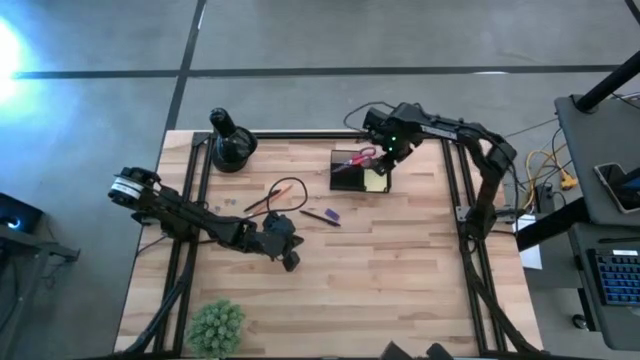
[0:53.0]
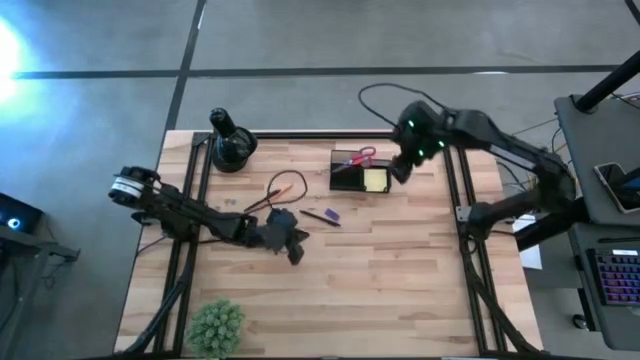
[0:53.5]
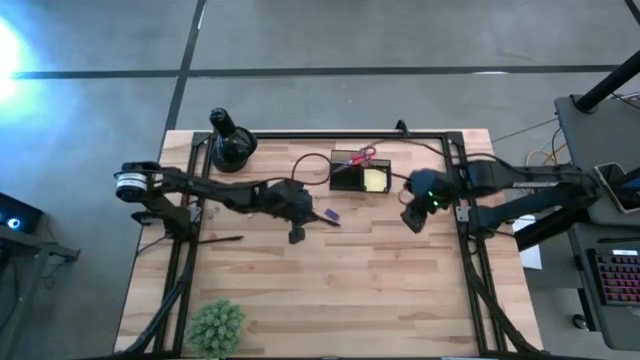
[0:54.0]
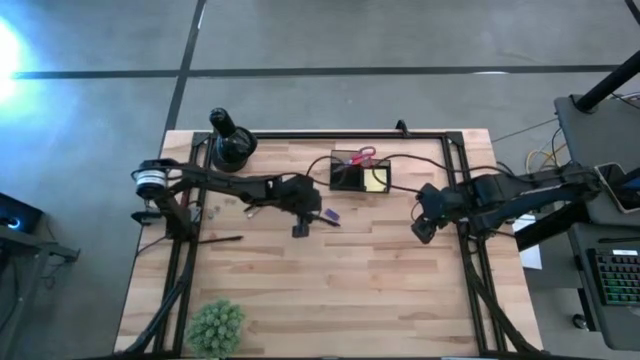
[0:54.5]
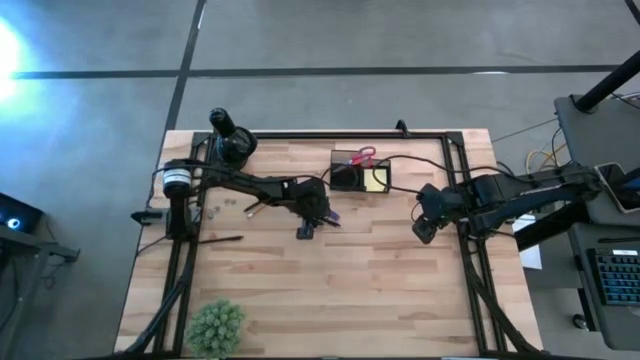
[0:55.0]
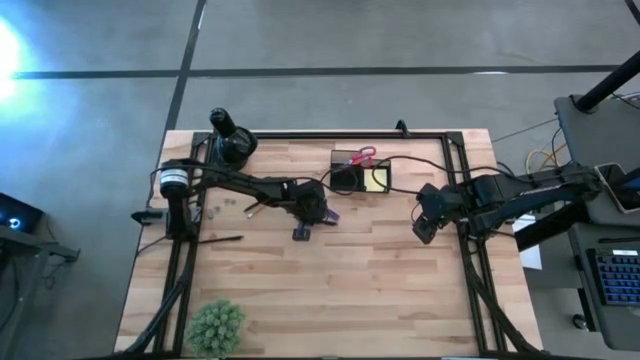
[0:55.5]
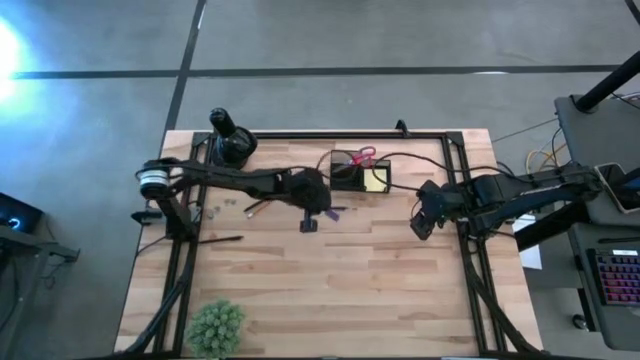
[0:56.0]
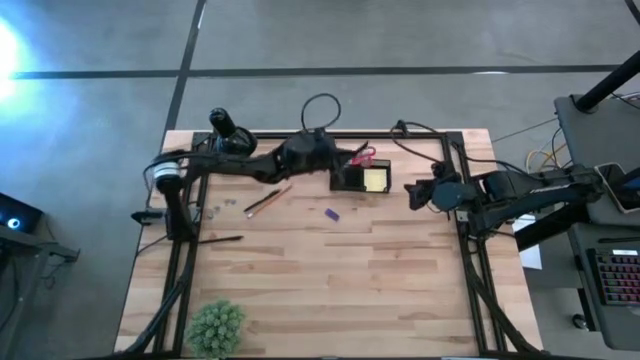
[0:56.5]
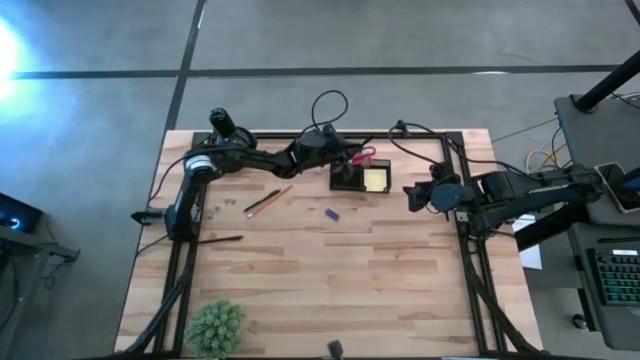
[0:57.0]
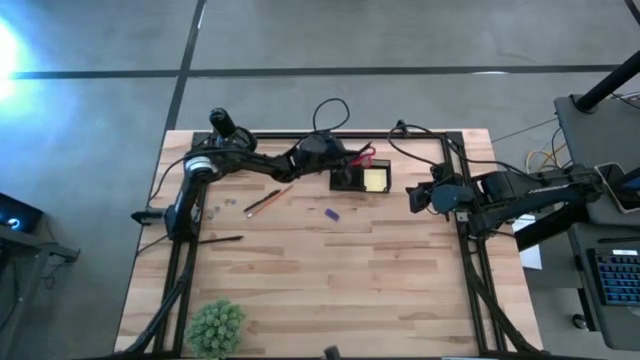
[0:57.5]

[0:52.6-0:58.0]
Task: Pick and place office supplies into organizer
Put the right black pen into the desk organizer

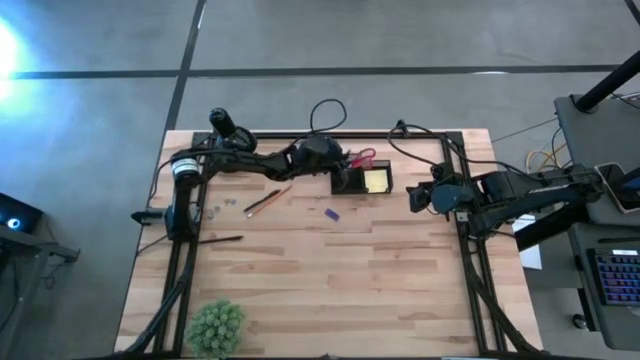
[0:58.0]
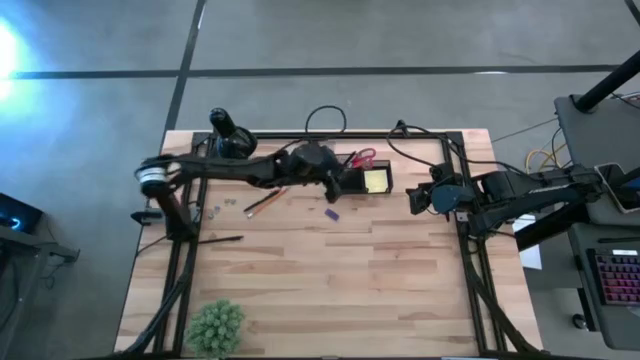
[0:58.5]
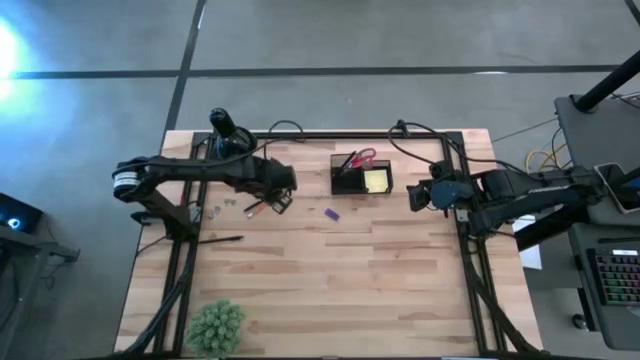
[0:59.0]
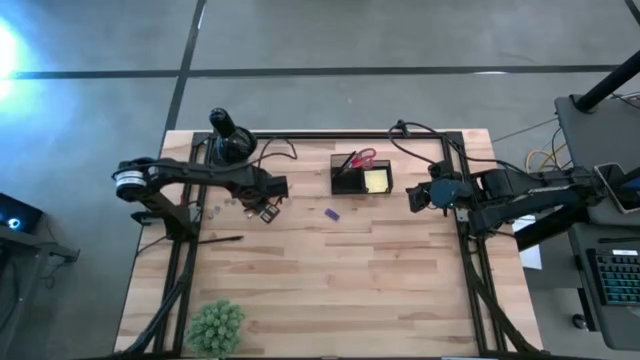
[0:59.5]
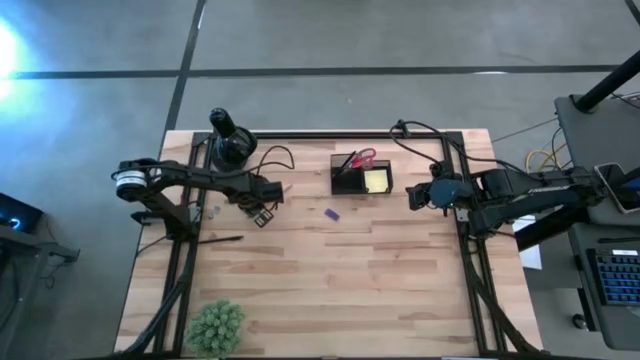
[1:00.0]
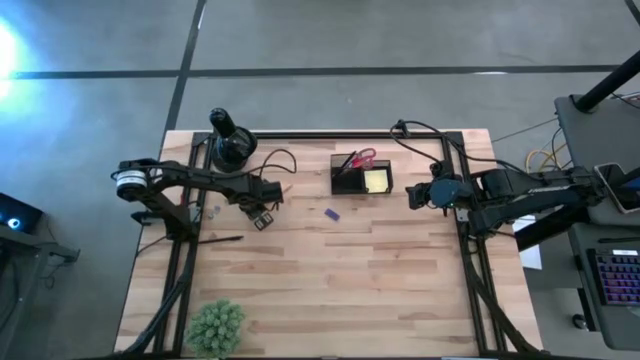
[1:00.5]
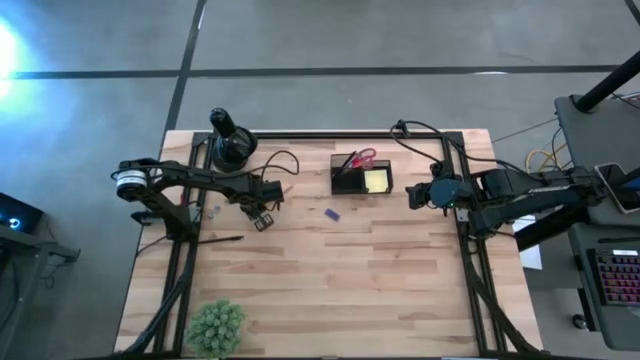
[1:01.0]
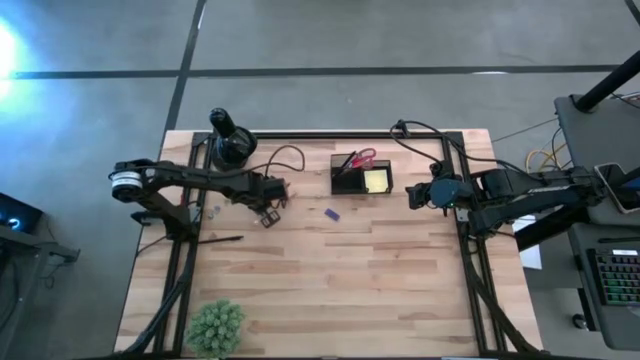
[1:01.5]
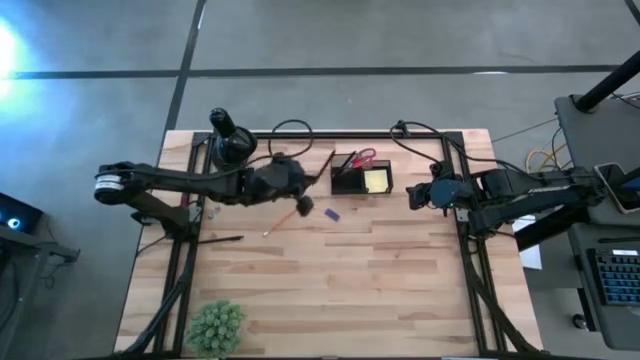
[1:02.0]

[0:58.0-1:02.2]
Put the top black pen into the desk organizer

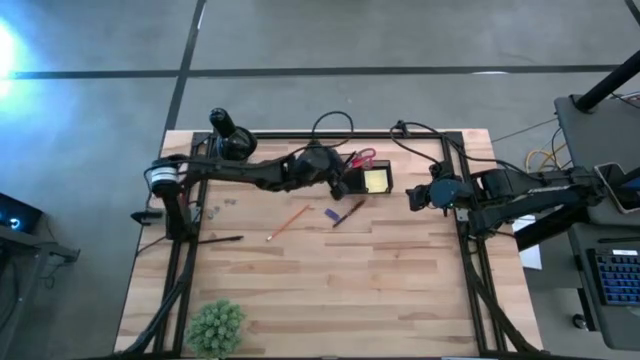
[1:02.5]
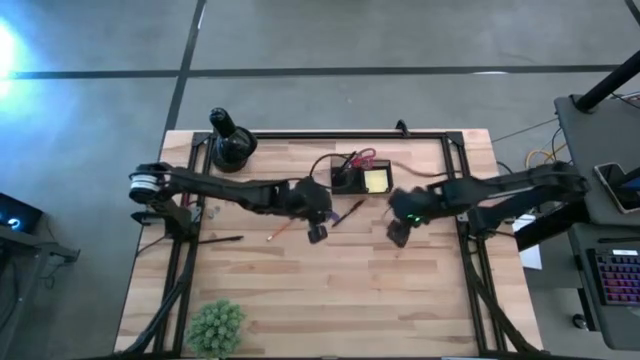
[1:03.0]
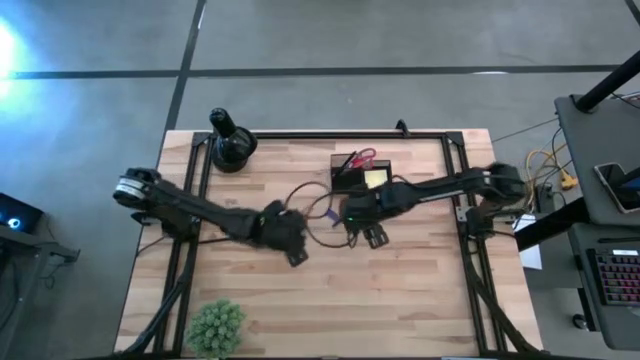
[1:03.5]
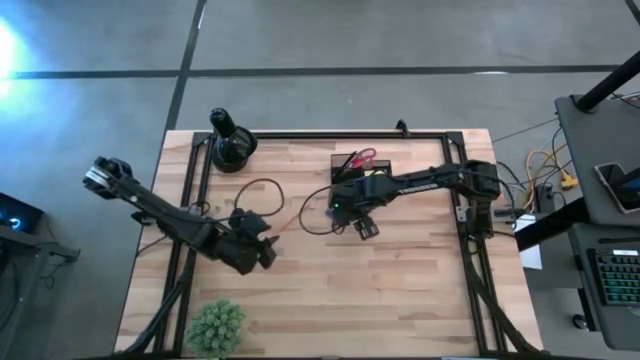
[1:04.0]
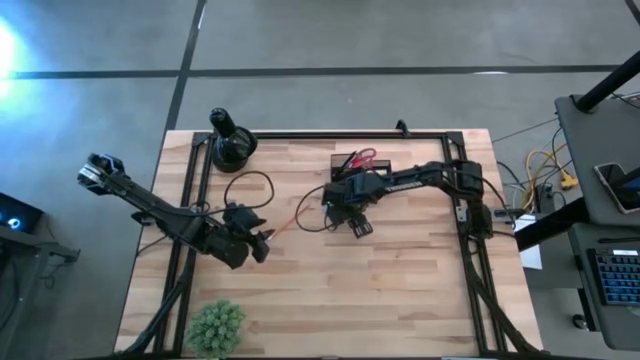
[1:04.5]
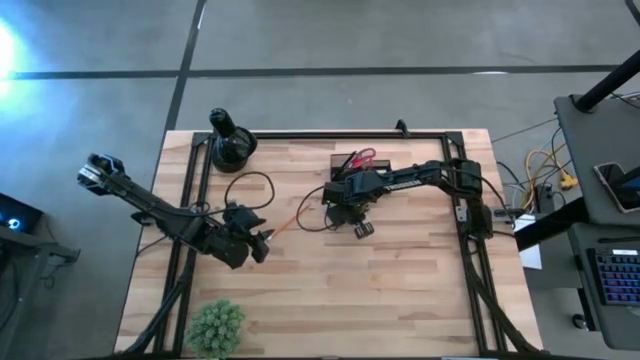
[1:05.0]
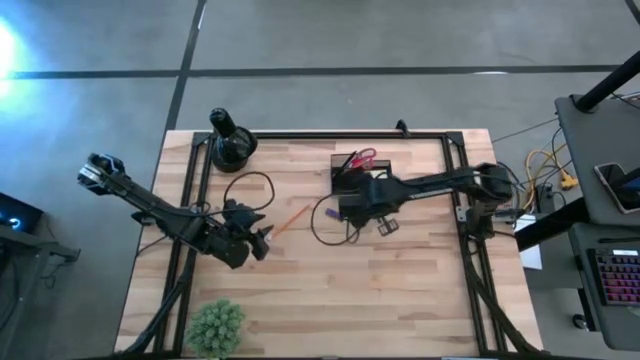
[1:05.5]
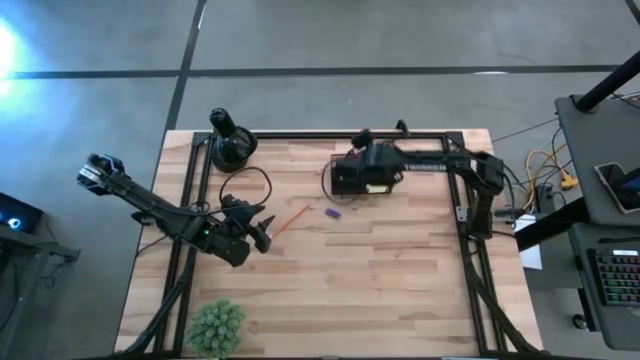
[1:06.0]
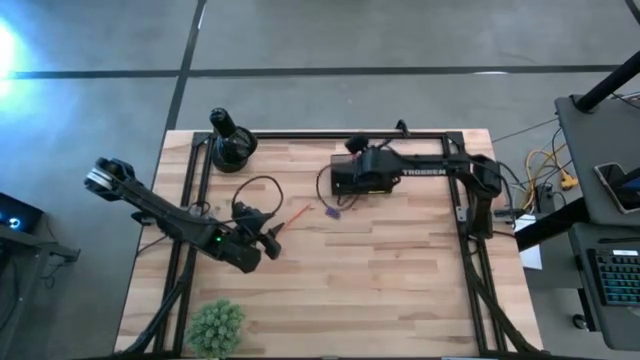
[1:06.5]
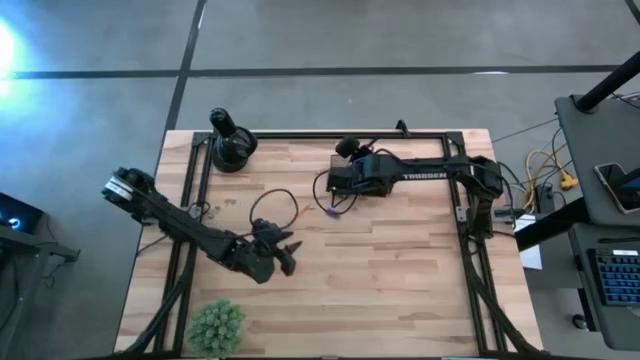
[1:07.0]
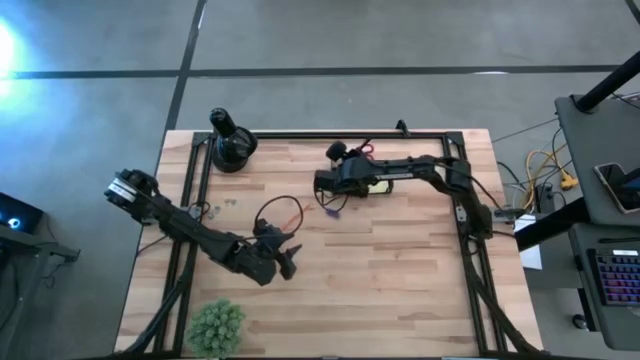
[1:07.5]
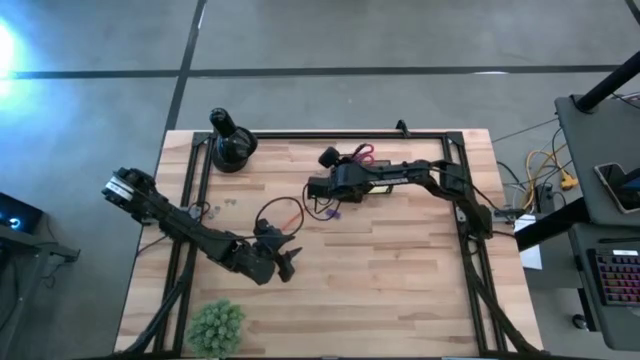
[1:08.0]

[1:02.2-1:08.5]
Put the top black pen into the desk organizer

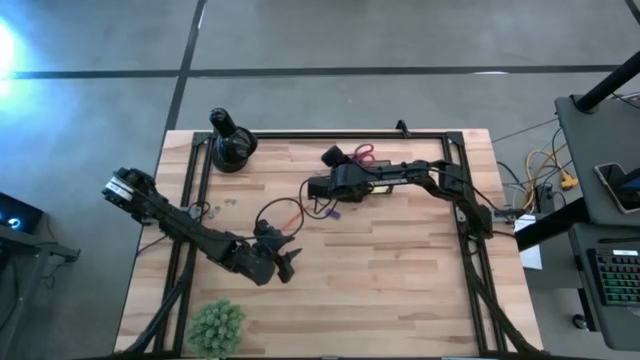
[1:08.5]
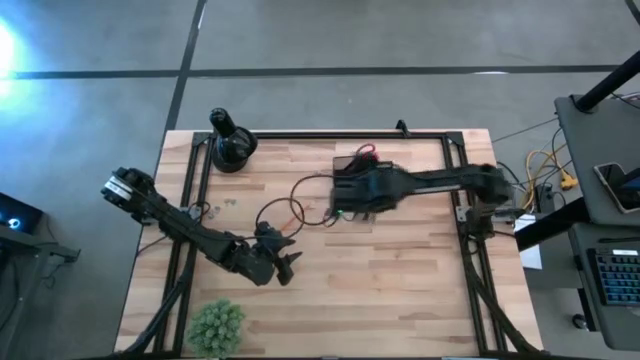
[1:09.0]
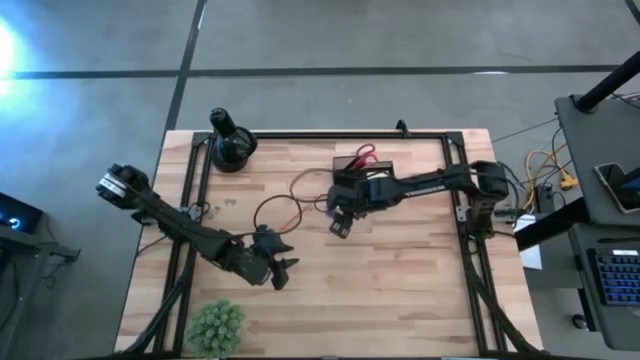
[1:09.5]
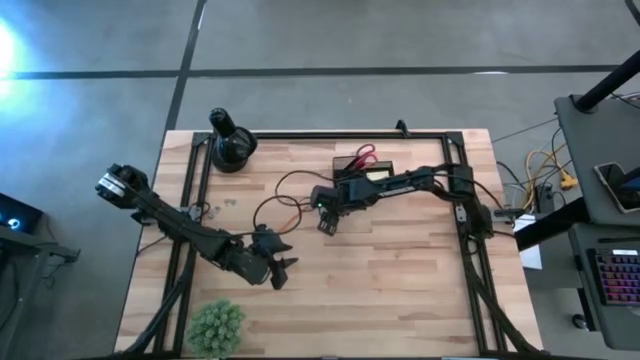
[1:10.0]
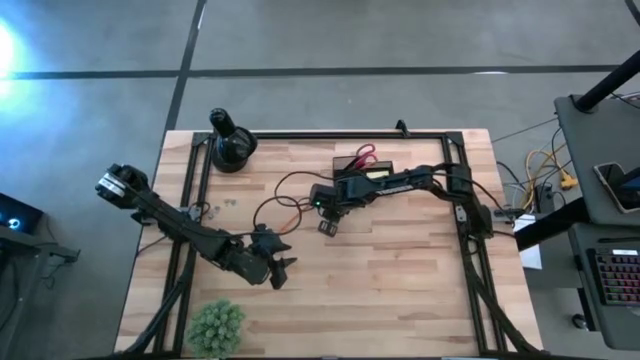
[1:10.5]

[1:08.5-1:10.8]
Put the eraser into the desk organizer

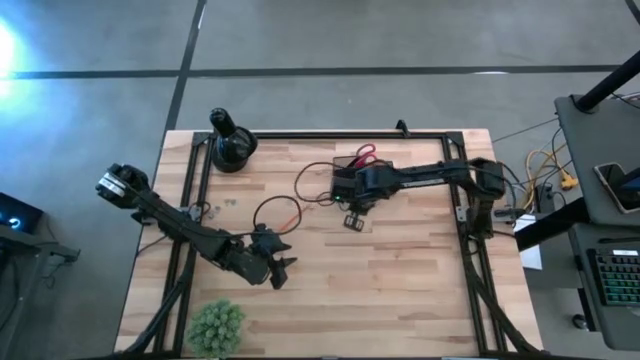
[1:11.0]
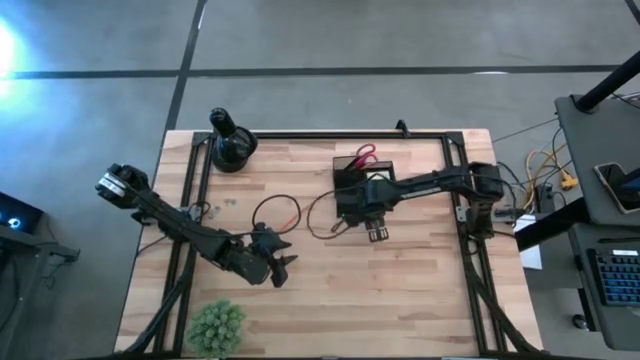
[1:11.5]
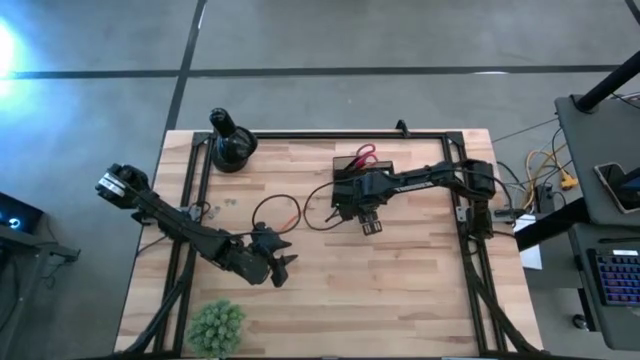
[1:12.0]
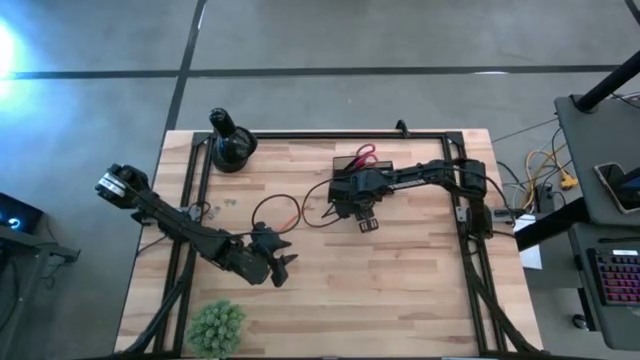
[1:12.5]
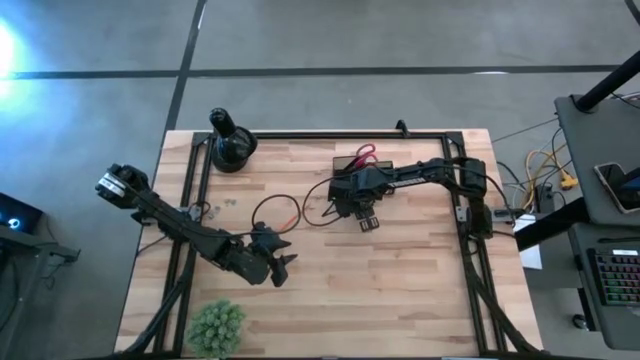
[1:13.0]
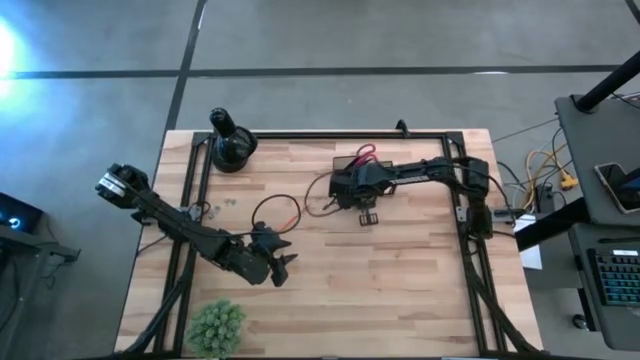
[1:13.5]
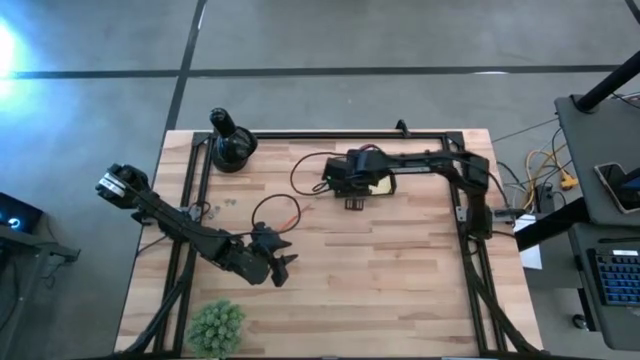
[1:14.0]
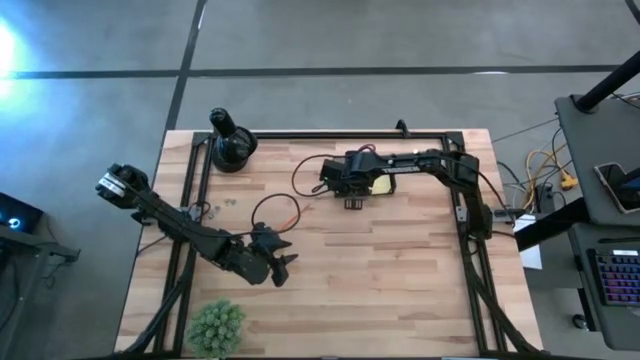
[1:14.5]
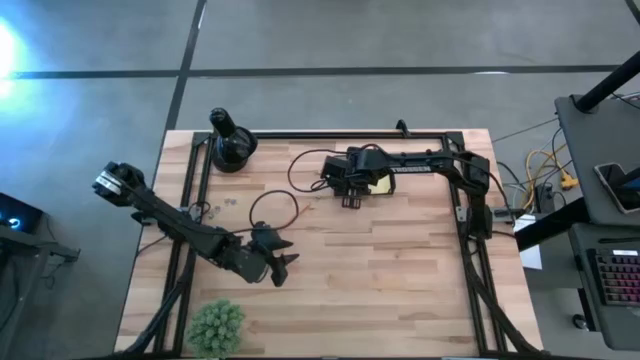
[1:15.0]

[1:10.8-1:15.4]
Put the eraser into the desk organizer
